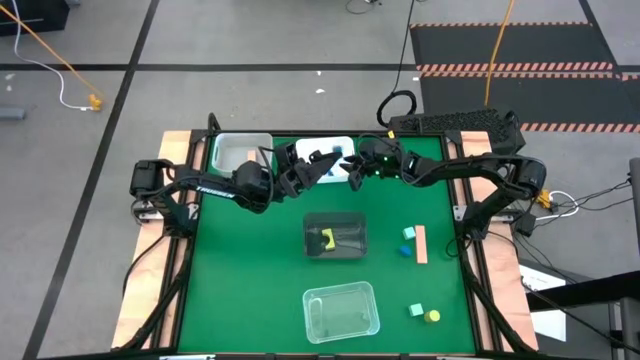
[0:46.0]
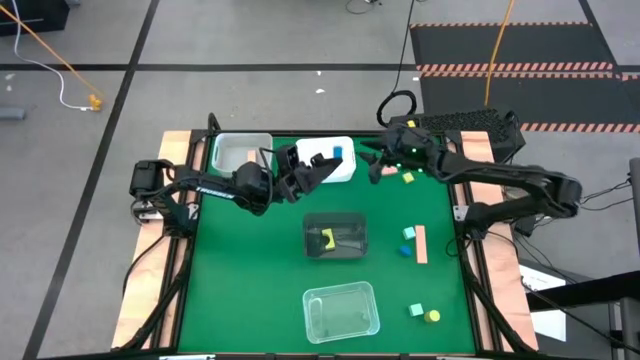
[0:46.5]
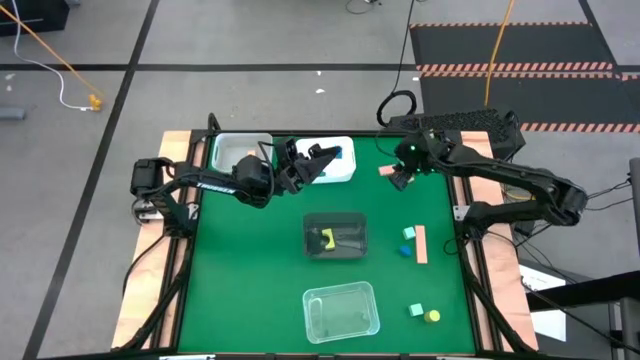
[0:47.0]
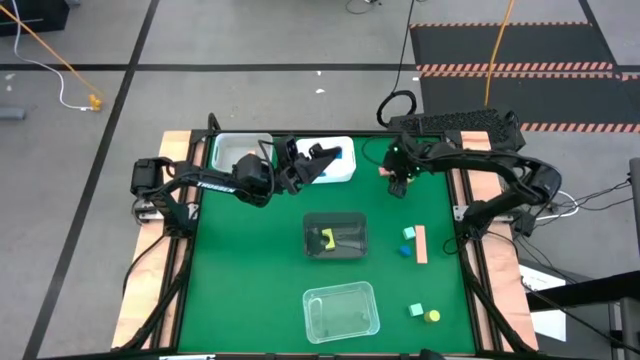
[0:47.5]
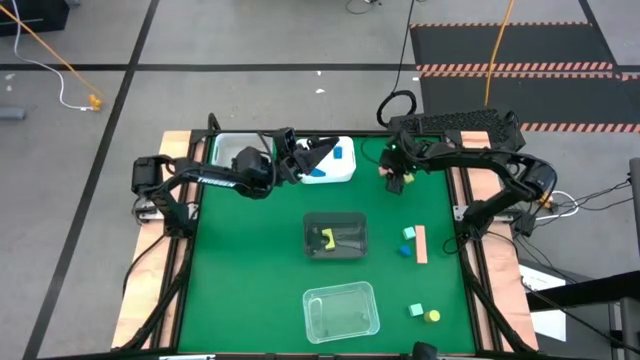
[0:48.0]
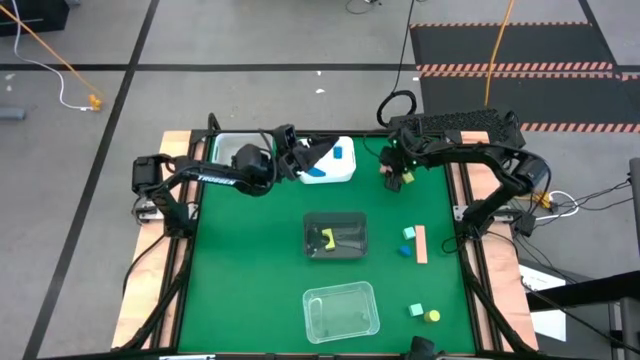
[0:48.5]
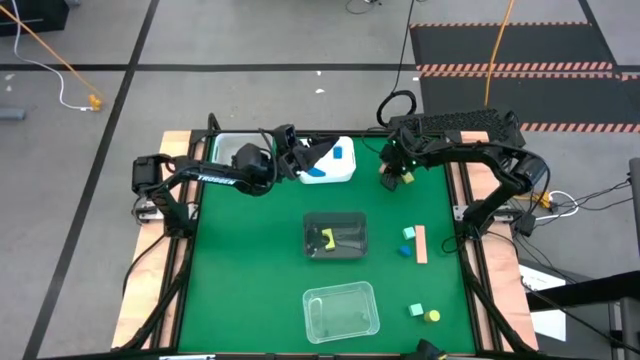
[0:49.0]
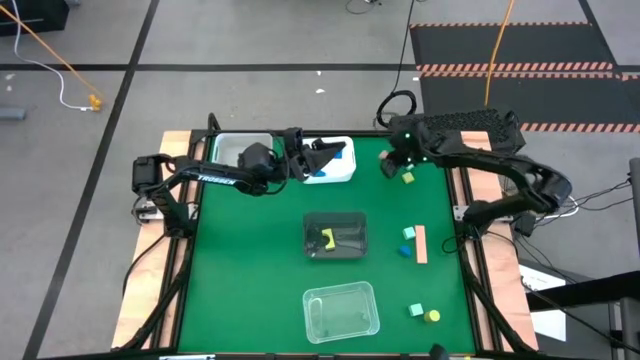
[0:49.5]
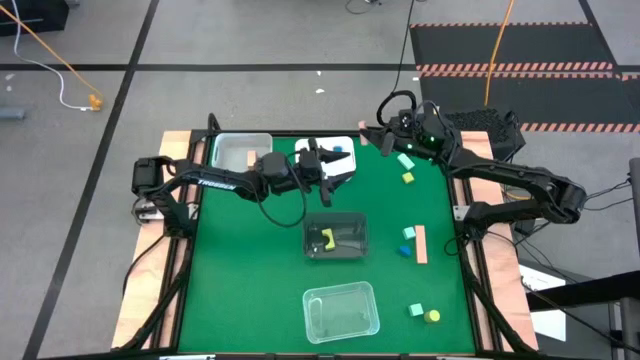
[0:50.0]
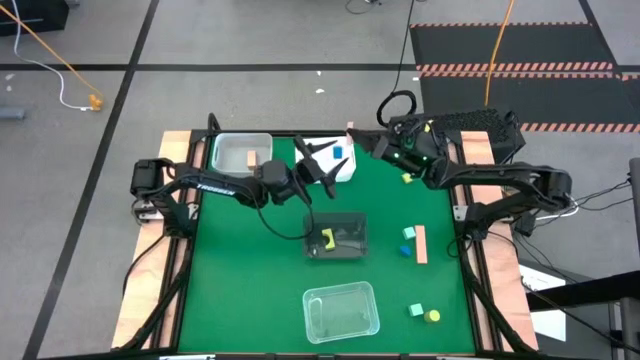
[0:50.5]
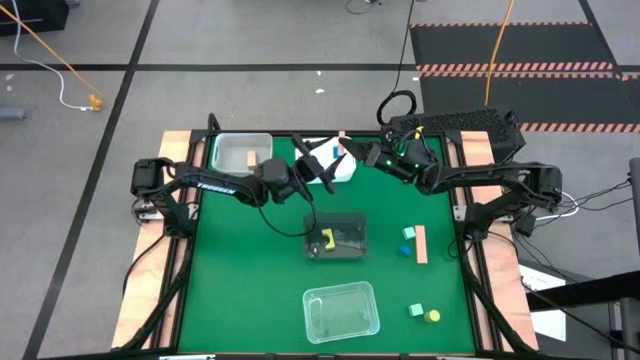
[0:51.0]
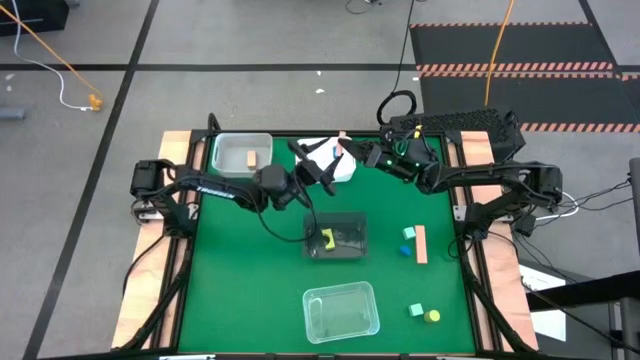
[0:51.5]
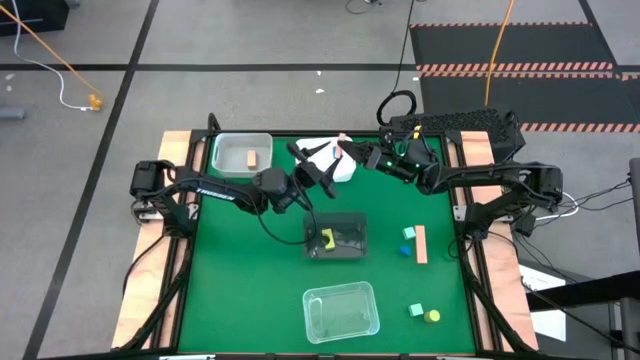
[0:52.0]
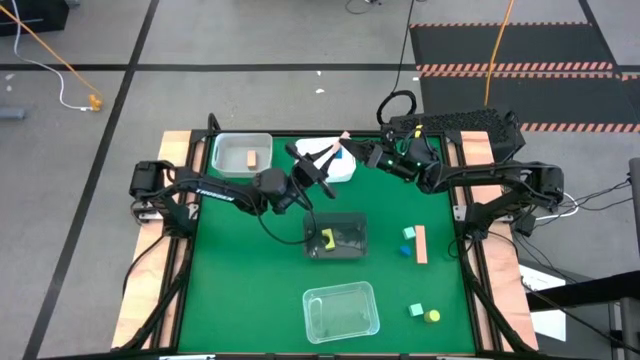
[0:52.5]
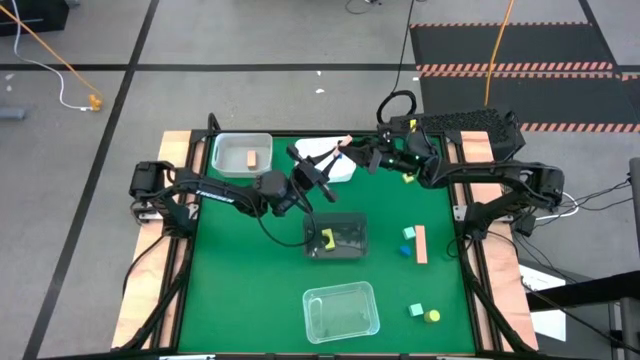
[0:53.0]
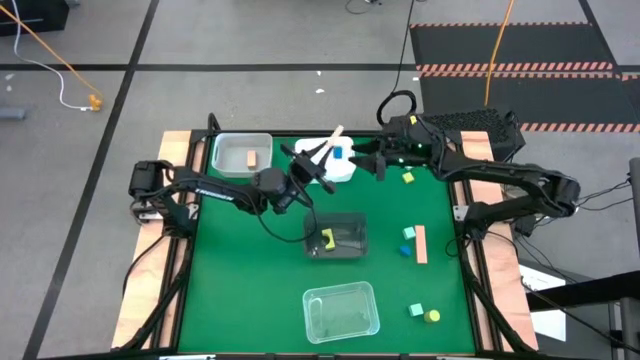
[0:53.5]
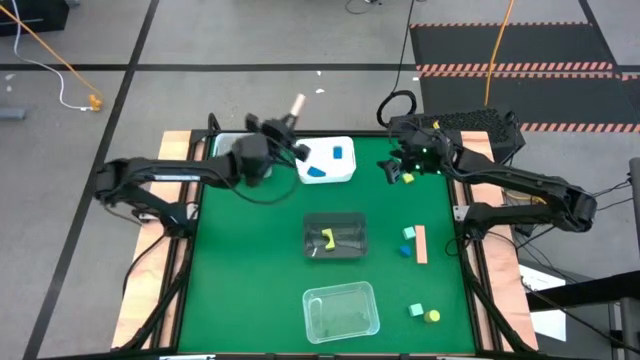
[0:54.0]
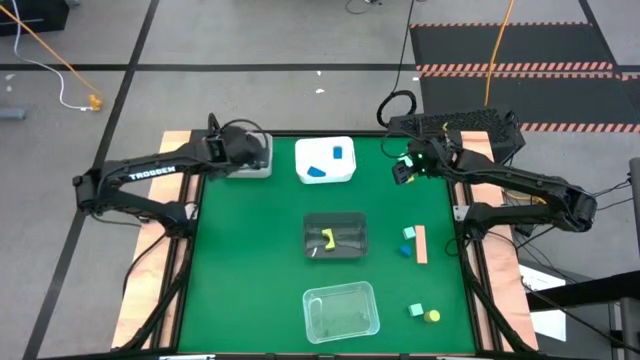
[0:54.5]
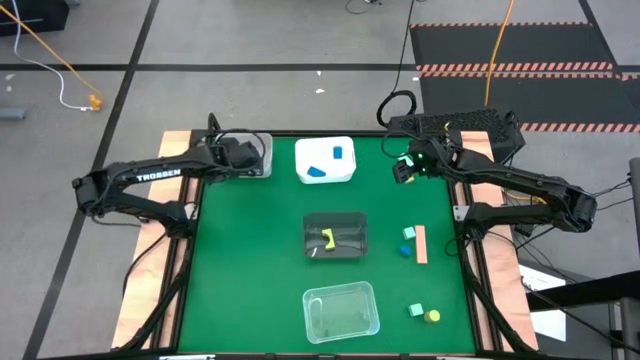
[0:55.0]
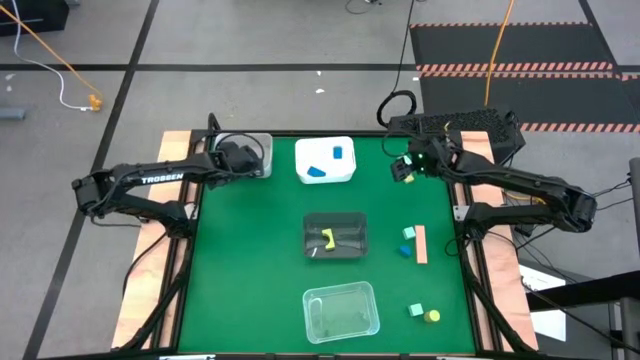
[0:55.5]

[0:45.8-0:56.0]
Task: Sort & place blocks by color
Put the top brown block into the gray bin

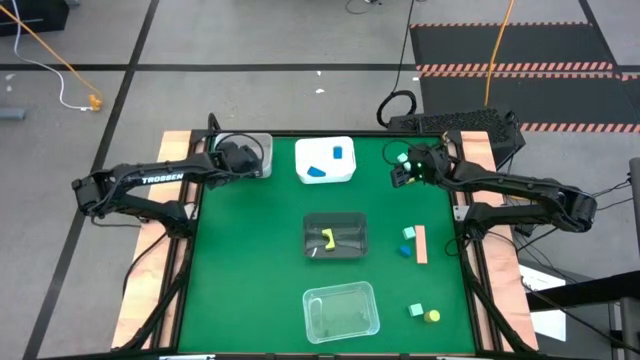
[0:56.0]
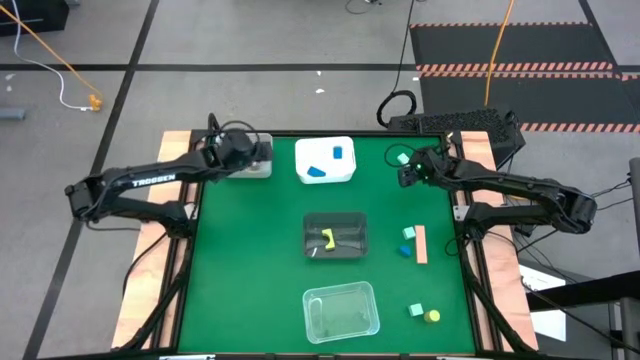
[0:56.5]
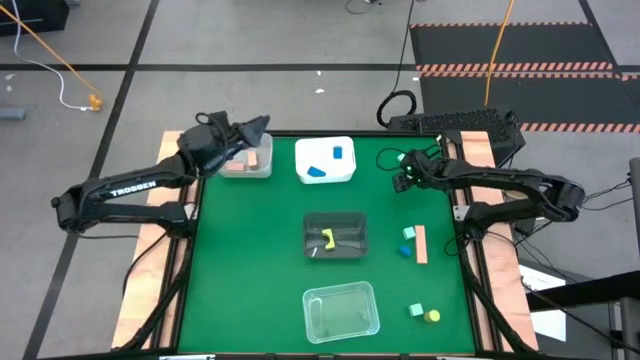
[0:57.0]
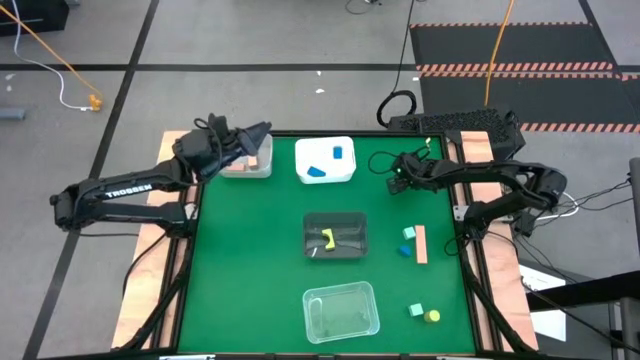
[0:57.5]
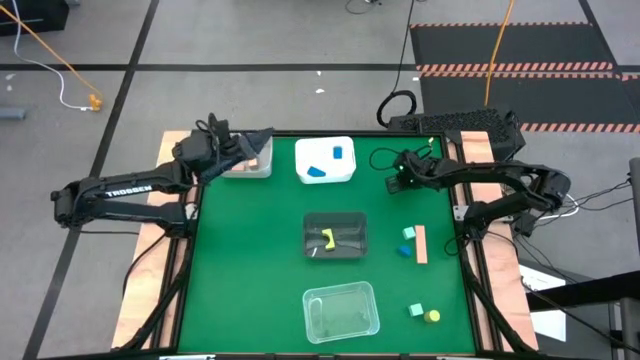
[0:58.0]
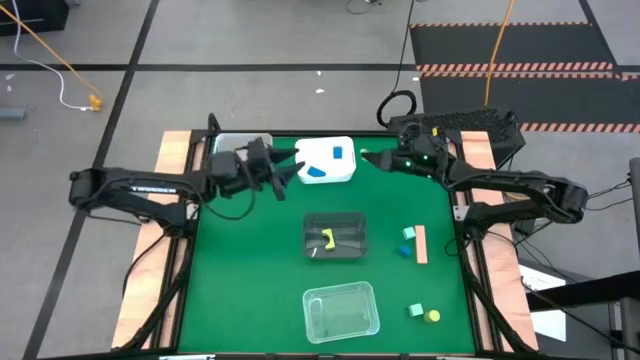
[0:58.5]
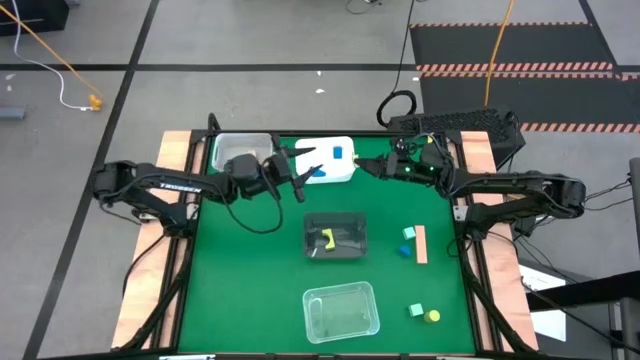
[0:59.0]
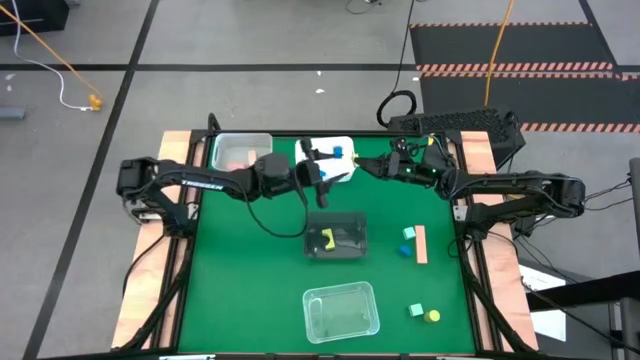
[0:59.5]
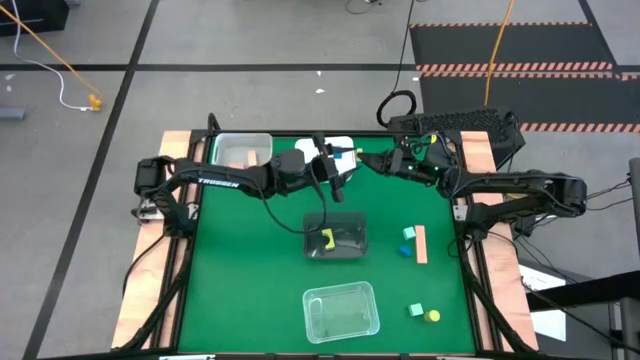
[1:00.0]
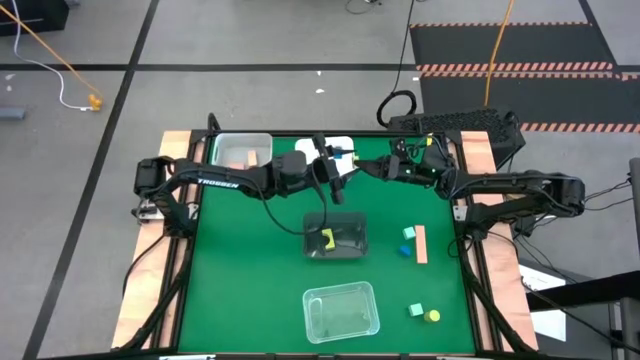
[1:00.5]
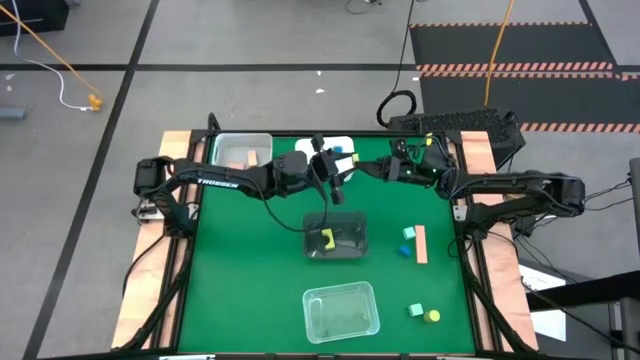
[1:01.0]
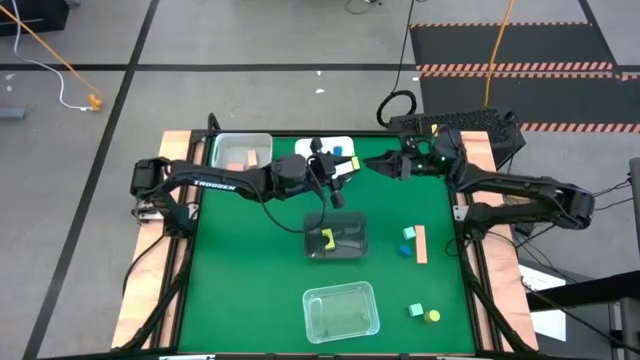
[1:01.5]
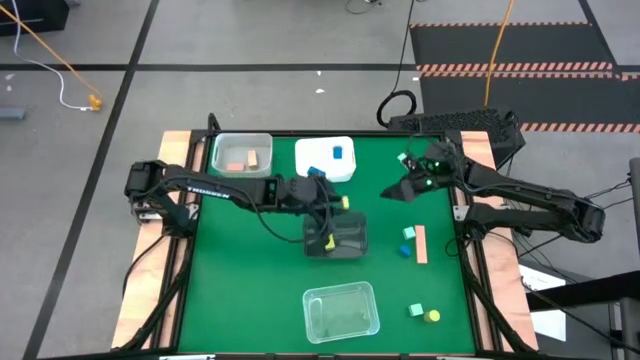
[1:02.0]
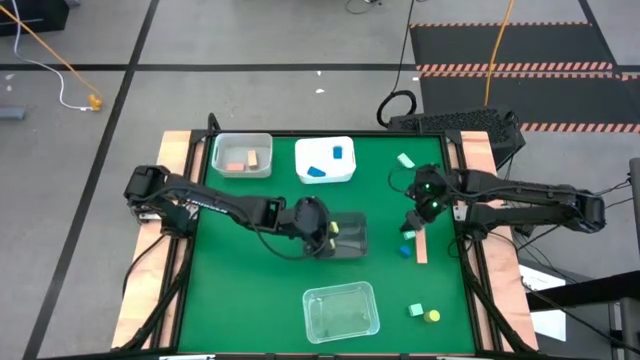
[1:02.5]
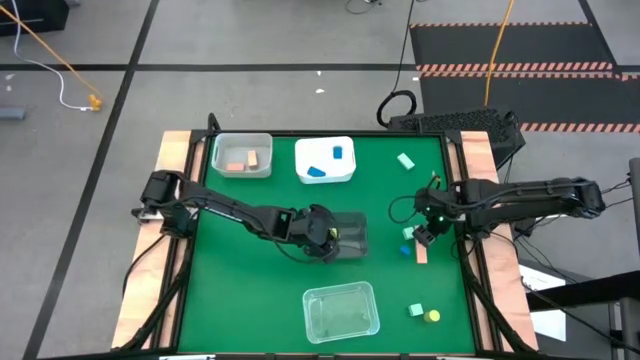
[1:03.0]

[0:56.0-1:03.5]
Put the top light green block into the black bin

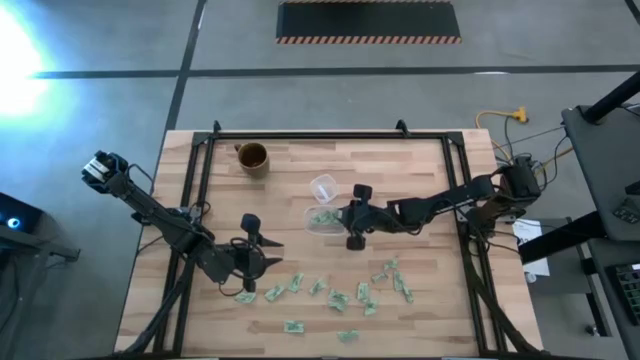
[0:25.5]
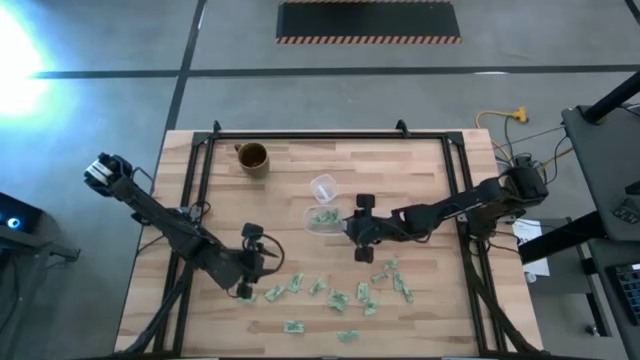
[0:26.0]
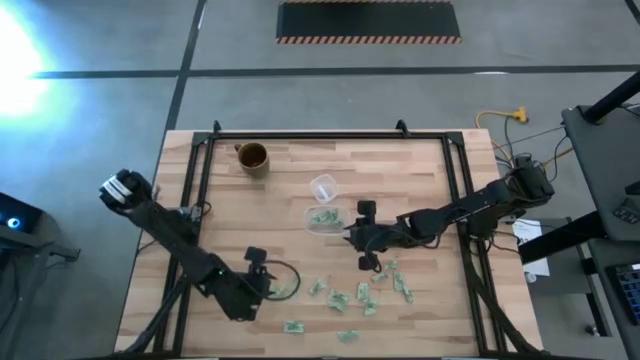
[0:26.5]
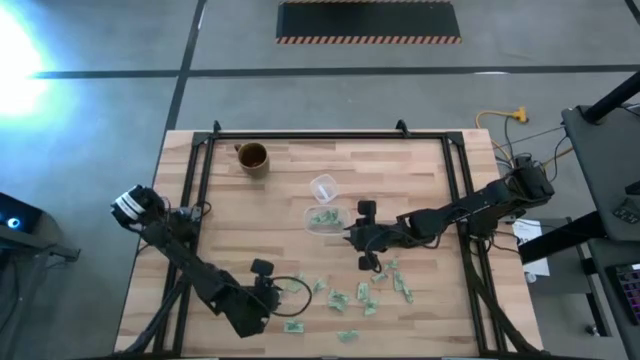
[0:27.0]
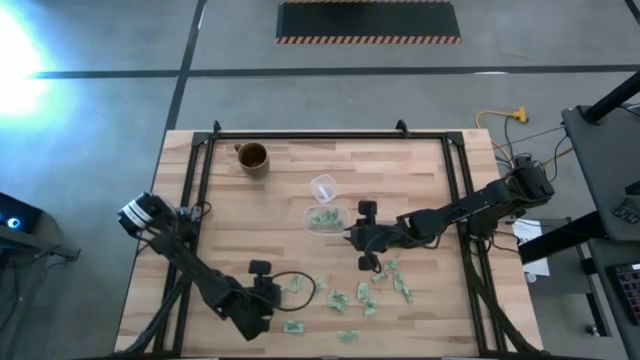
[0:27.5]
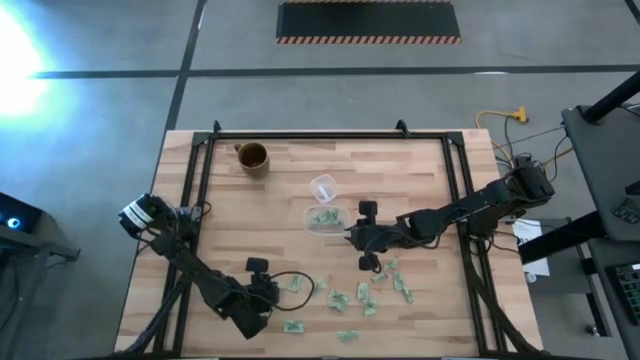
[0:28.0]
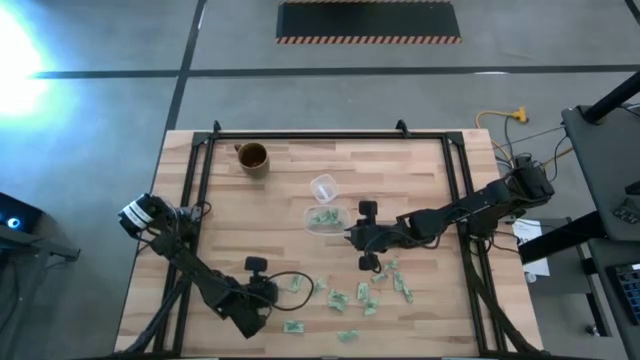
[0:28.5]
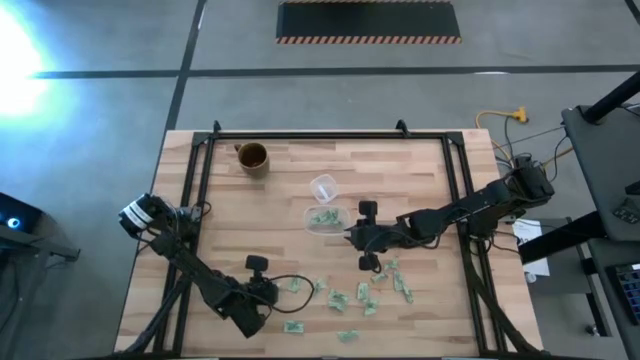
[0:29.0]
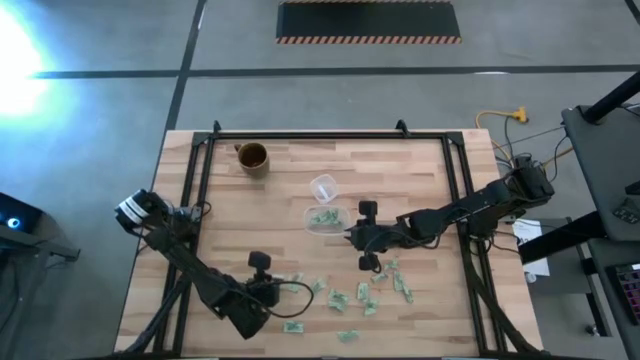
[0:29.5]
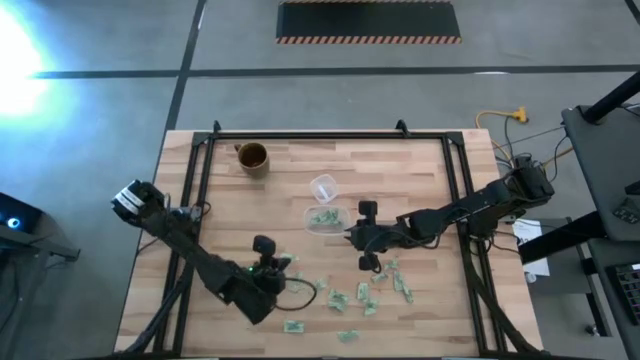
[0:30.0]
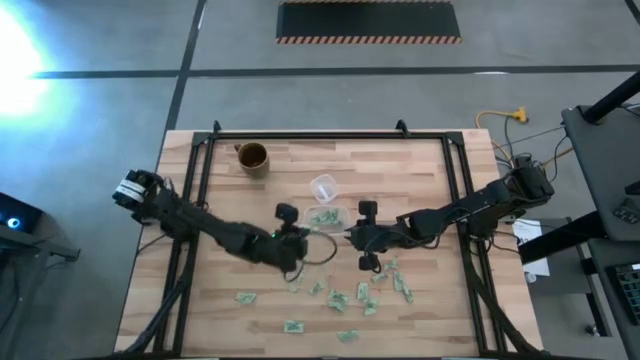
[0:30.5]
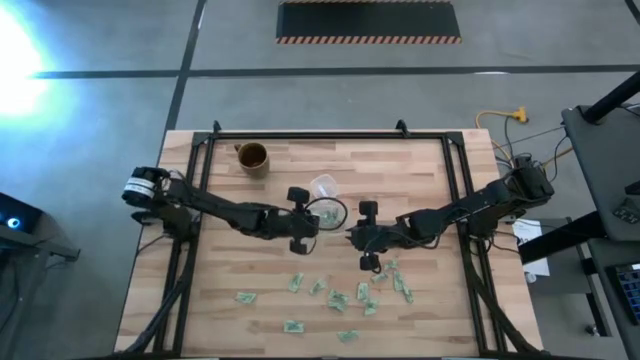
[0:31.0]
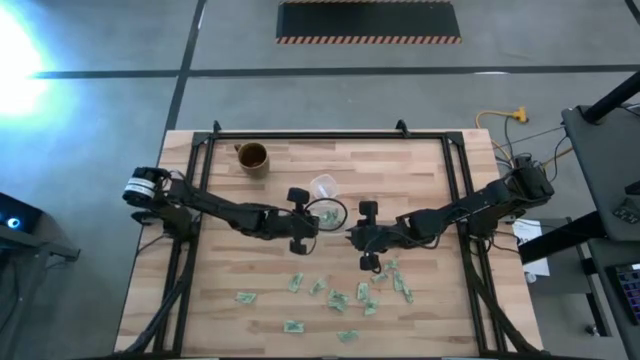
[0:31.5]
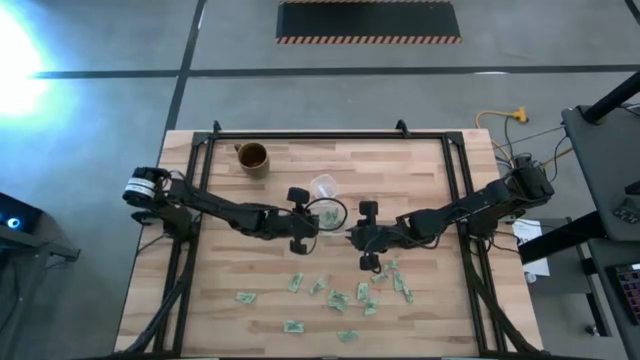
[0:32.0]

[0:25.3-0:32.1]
Task: Pick and place Stevia / Truvia into bins
Put the stevia packet into the bottom transparent container
